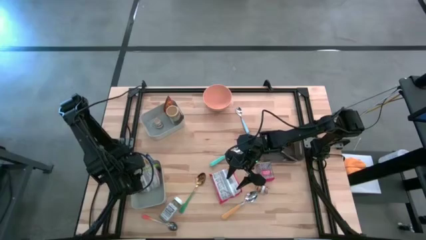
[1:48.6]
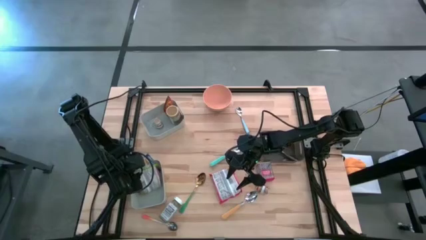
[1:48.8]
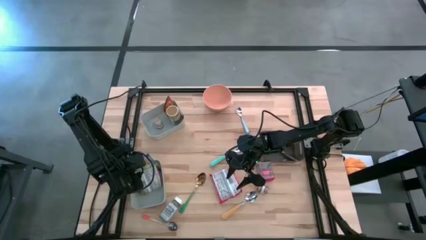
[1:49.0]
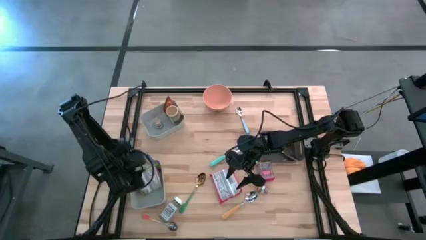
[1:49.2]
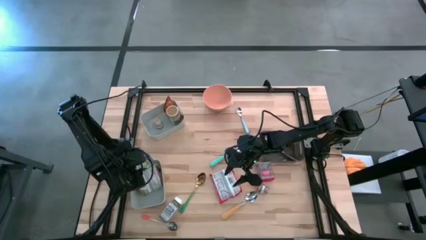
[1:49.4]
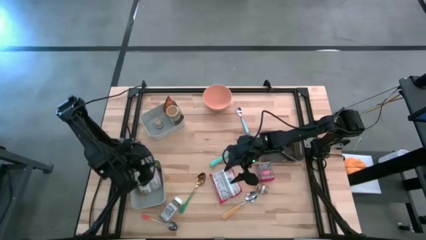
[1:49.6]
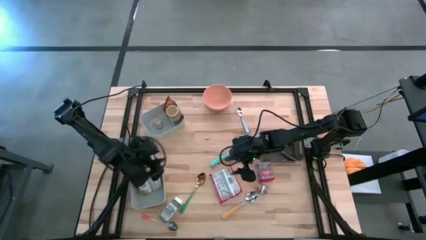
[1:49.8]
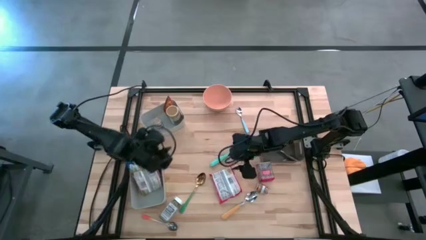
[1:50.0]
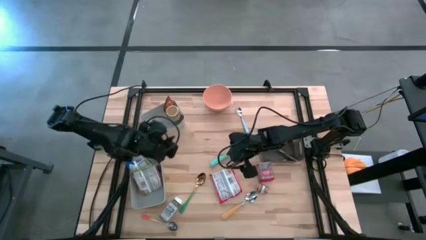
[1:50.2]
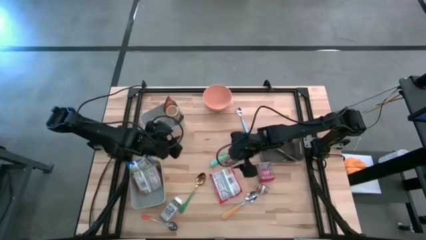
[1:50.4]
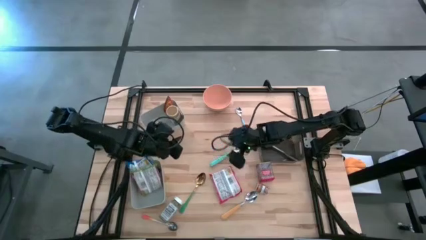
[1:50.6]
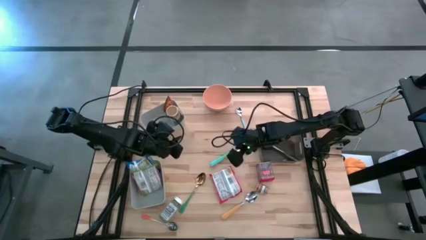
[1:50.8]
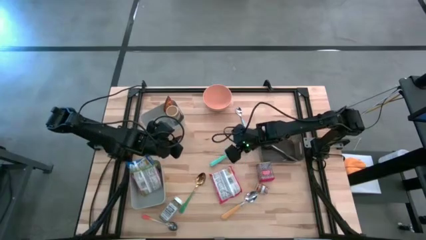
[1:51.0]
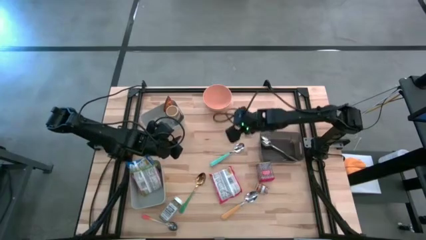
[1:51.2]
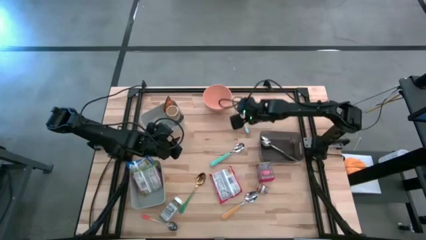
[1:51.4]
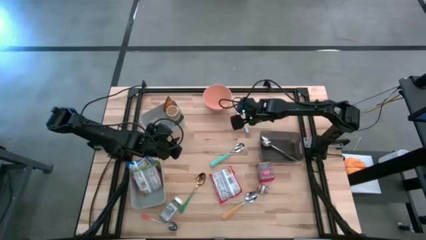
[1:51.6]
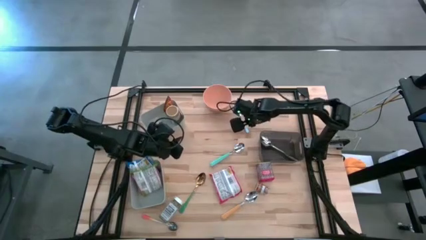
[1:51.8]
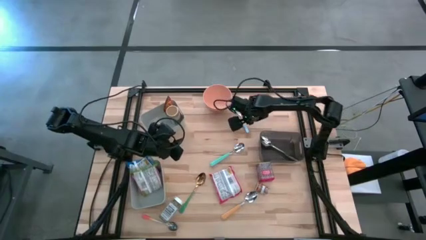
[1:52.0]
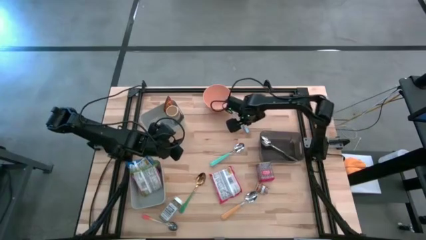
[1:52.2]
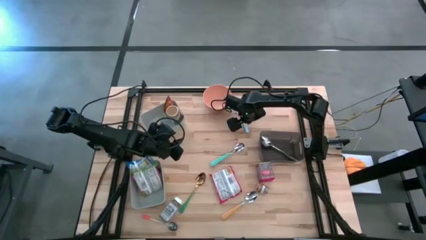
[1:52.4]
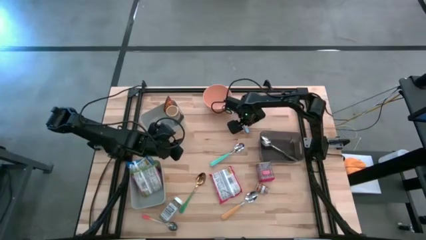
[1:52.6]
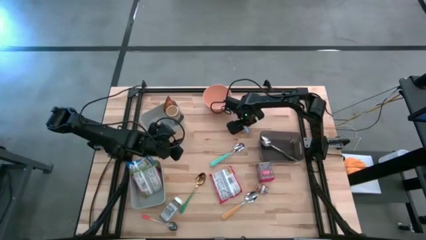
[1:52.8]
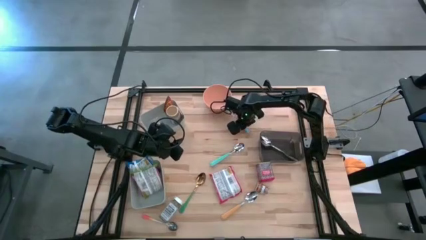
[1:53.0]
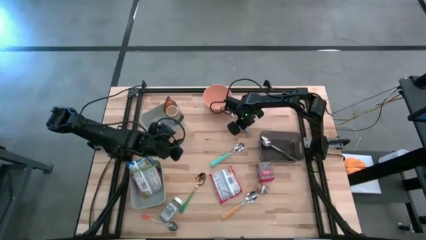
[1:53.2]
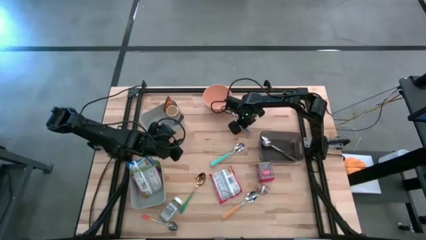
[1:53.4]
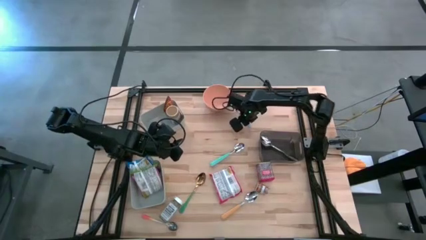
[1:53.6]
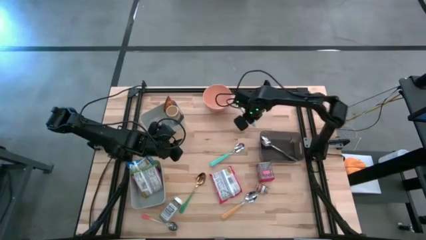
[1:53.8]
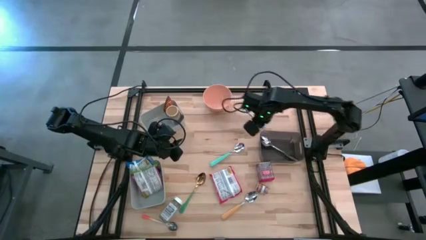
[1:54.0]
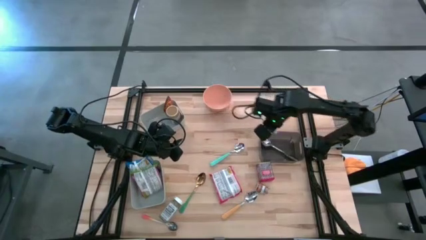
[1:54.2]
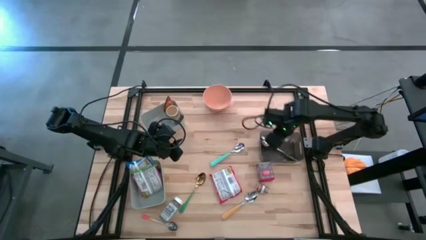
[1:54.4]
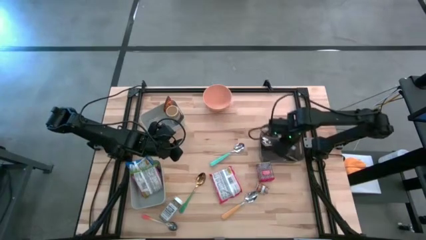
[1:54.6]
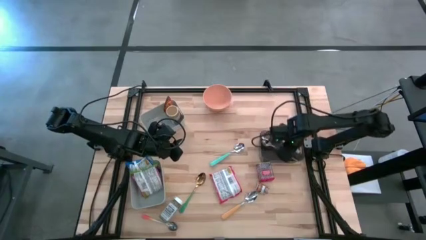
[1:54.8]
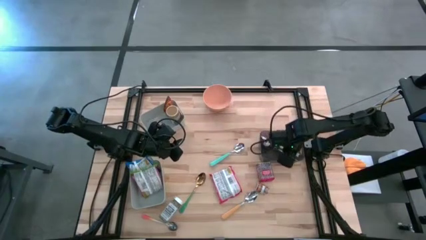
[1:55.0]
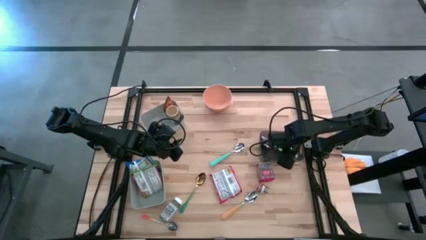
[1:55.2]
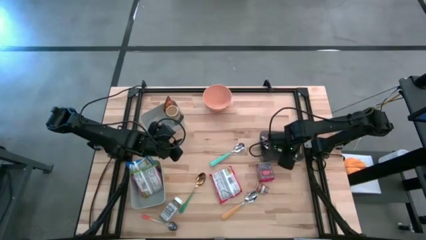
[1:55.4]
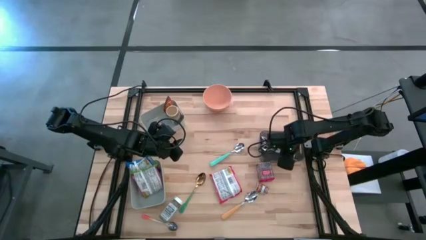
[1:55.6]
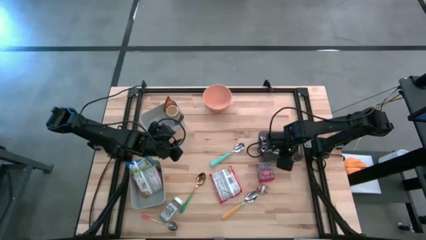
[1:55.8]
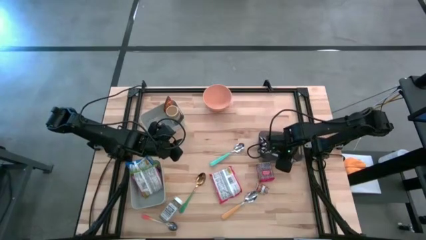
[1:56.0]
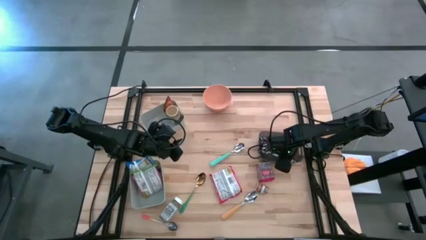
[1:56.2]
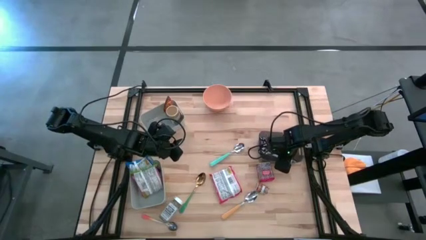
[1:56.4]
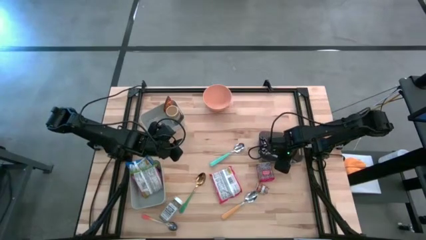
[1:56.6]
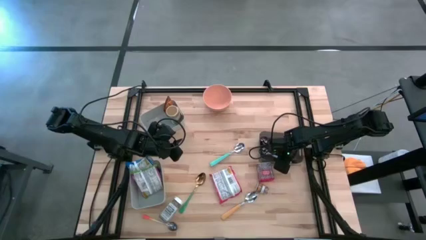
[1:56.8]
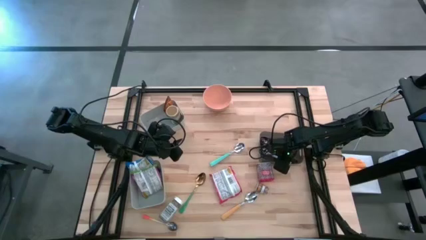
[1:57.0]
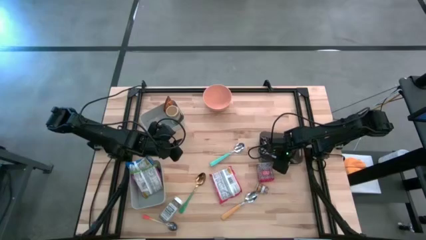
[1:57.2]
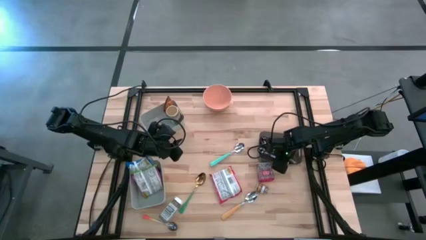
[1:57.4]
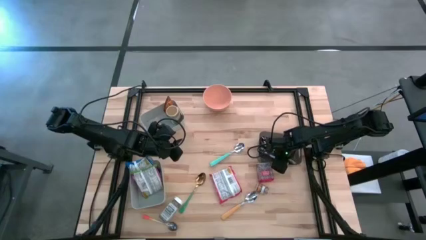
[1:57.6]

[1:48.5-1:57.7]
Put the top light blue spoon into the black bin

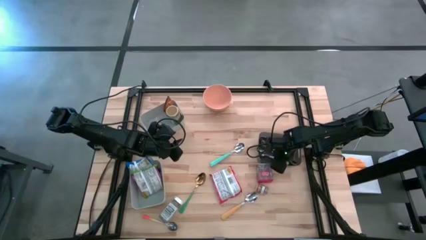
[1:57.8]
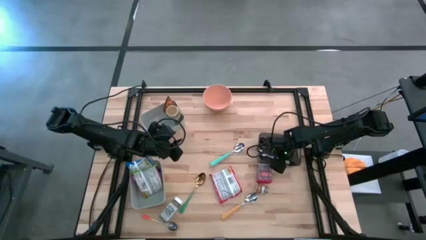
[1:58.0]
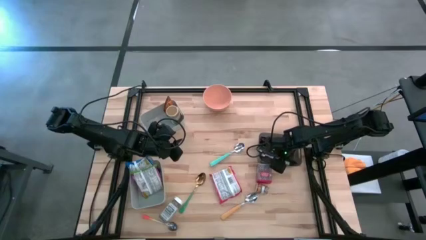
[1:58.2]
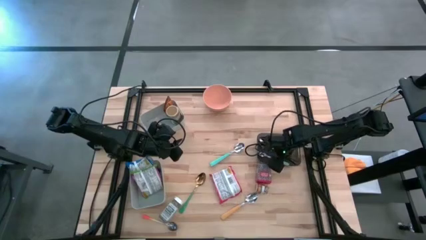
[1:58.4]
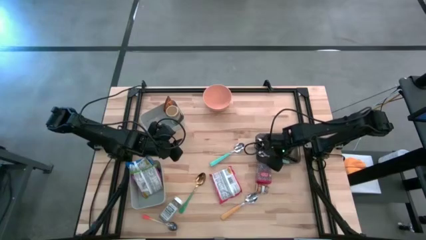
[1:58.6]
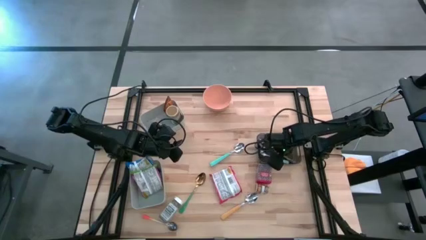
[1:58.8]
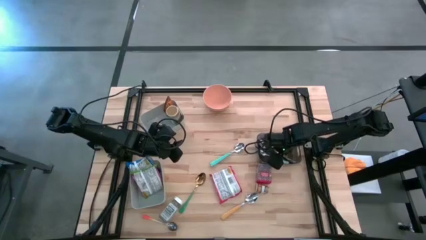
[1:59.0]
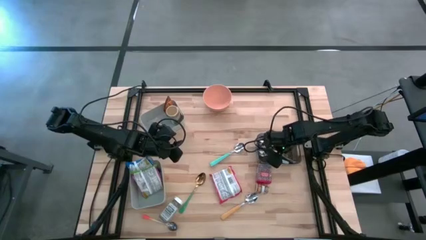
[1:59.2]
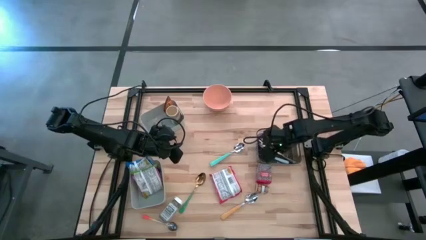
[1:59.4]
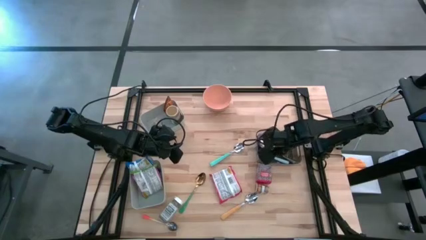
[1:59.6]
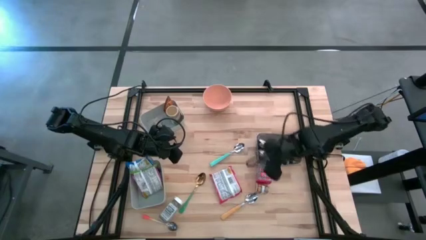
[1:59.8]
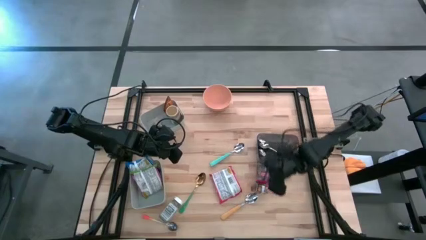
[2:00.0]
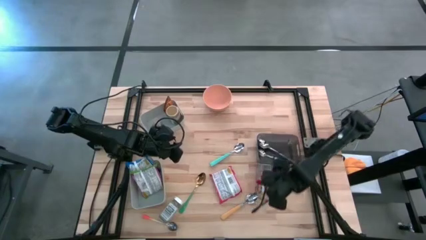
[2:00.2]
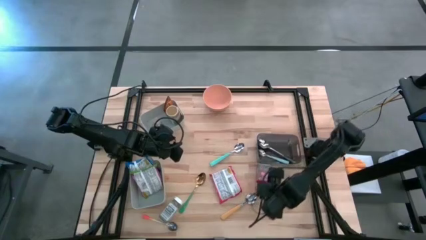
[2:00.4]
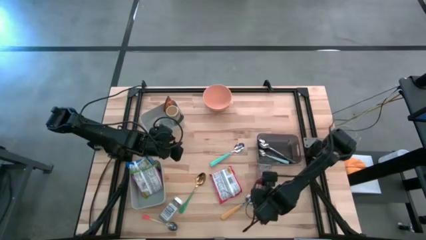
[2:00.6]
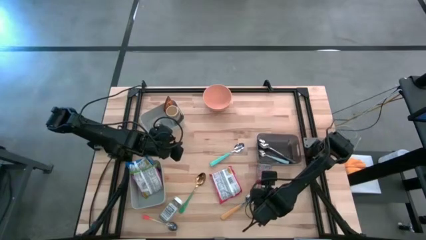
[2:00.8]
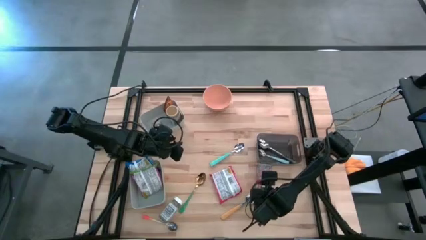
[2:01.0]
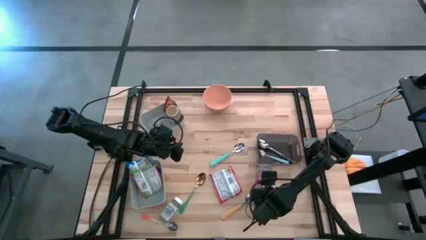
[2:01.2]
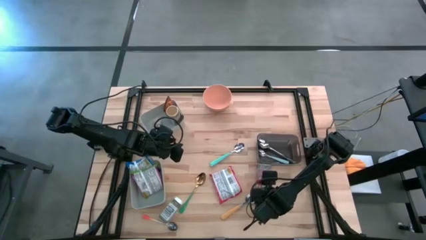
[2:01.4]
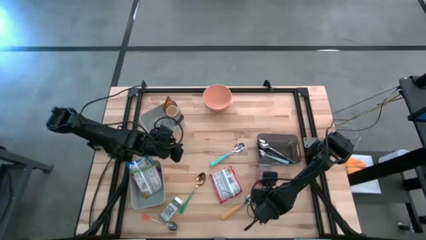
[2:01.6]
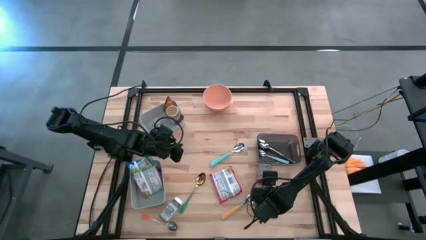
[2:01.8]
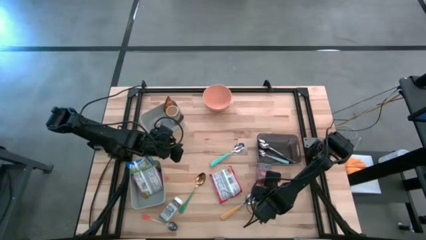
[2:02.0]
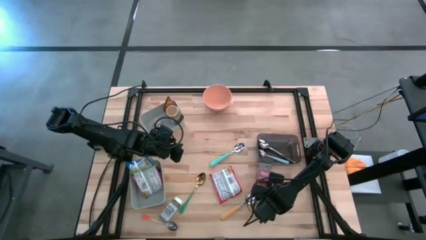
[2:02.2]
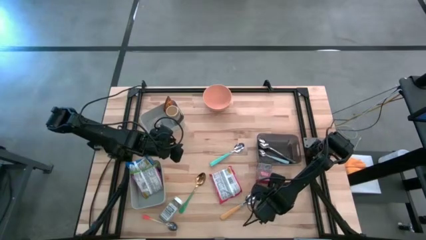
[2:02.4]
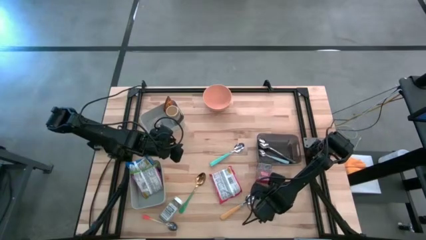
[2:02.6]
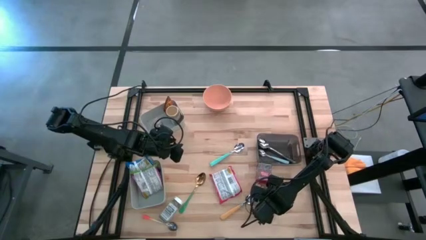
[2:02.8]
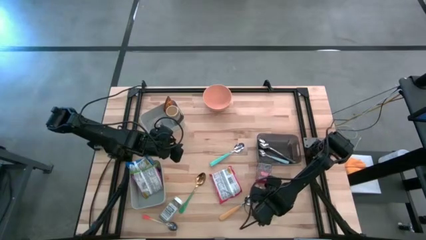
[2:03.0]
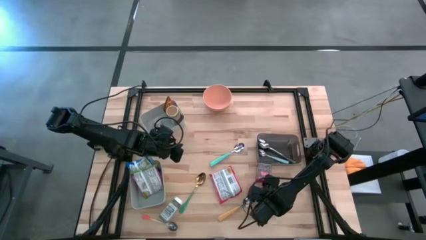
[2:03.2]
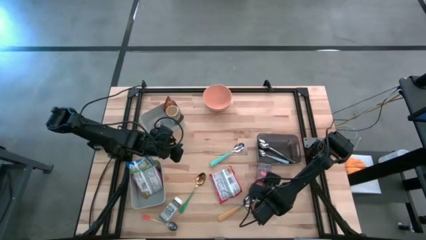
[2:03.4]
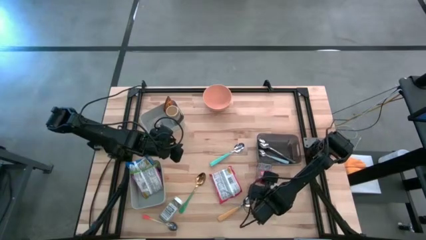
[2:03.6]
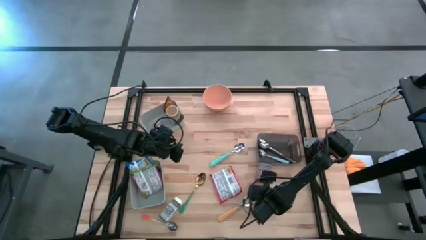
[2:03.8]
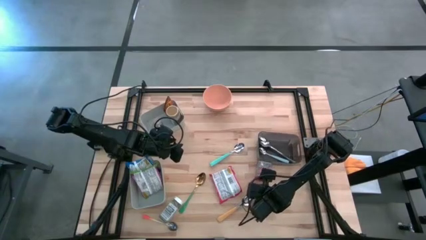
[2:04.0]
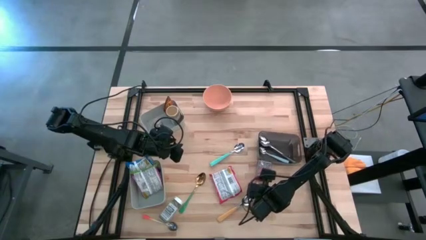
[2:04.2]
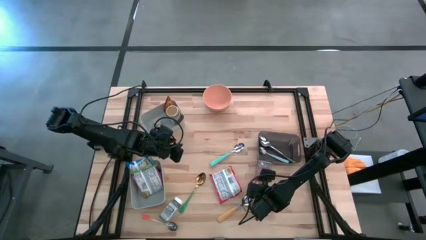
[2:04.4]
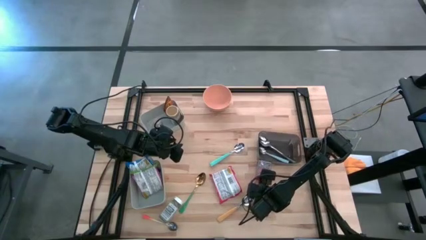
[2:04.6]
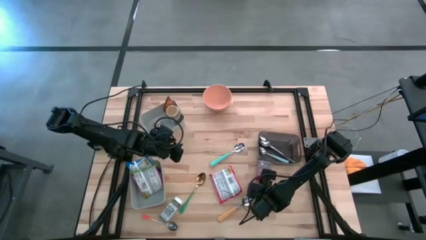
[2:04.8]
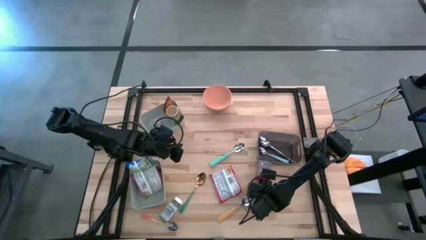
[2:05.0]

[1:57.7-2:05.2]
Put the brown seasoning bottle into the top gray bin
